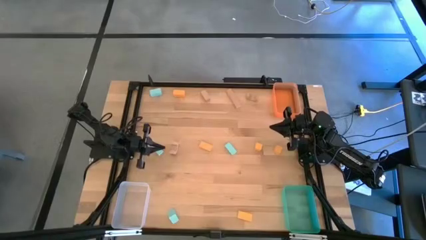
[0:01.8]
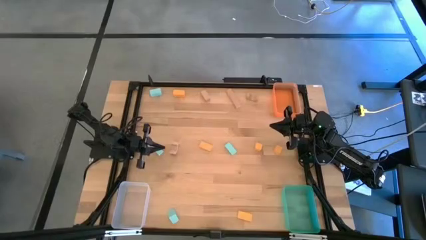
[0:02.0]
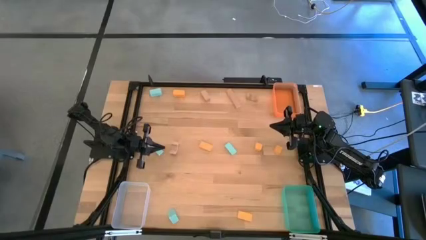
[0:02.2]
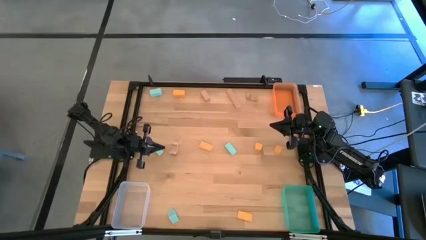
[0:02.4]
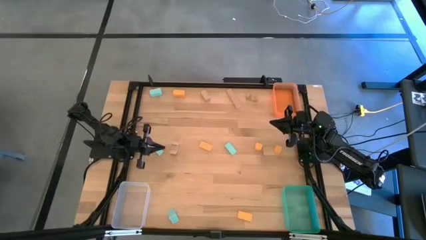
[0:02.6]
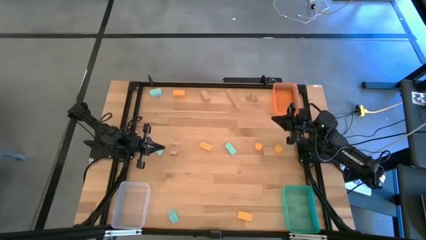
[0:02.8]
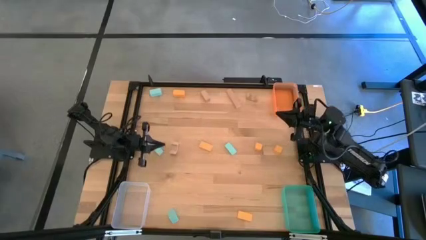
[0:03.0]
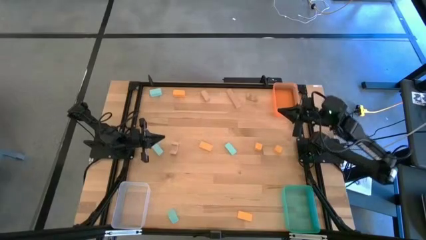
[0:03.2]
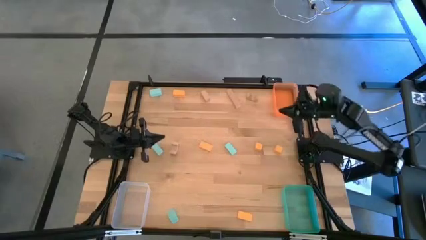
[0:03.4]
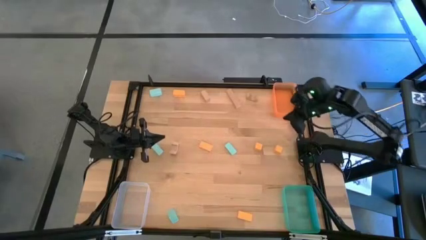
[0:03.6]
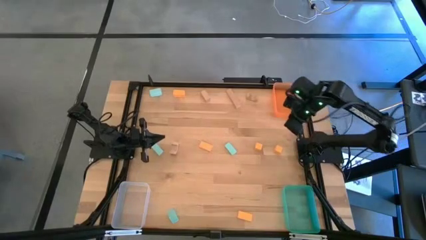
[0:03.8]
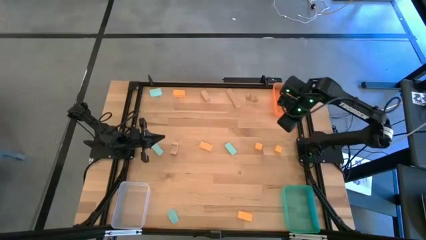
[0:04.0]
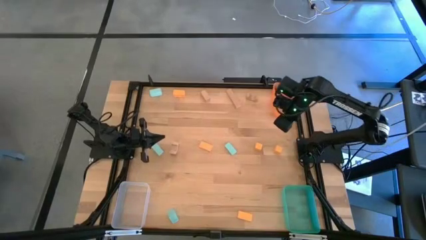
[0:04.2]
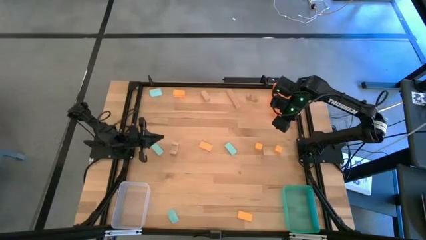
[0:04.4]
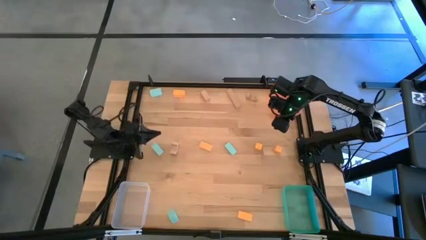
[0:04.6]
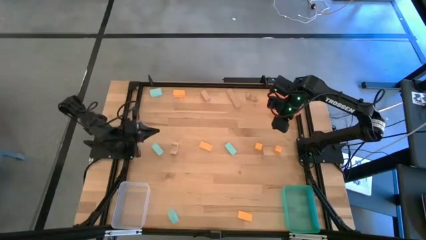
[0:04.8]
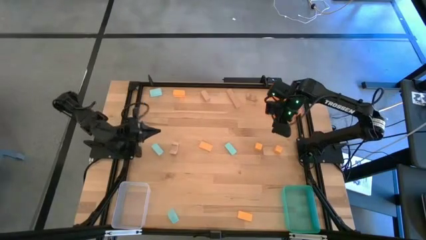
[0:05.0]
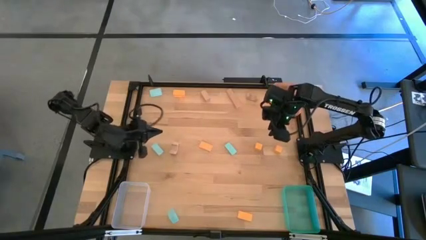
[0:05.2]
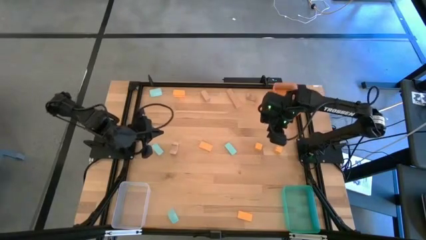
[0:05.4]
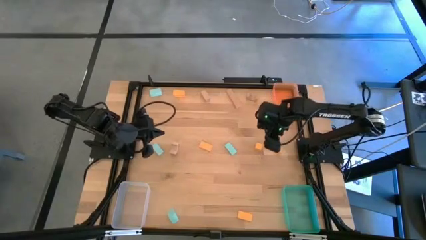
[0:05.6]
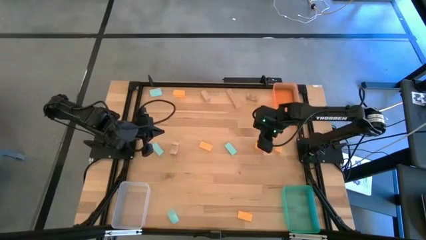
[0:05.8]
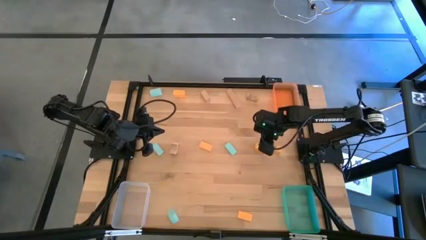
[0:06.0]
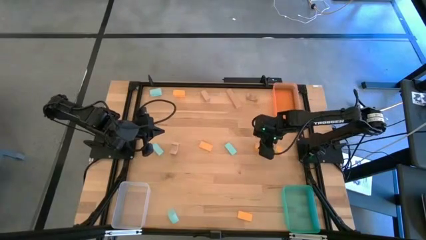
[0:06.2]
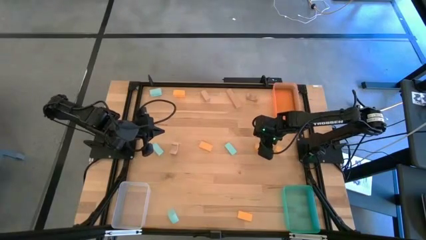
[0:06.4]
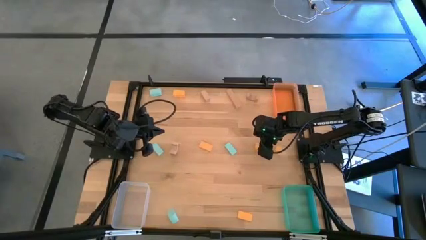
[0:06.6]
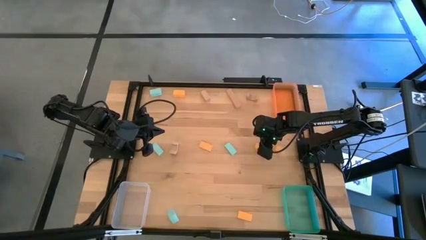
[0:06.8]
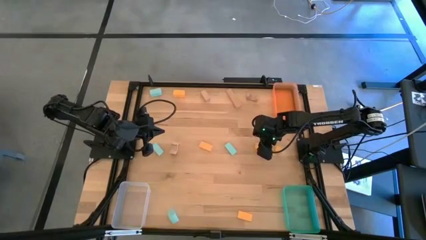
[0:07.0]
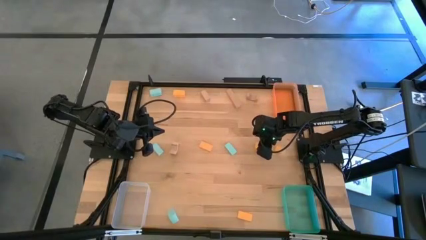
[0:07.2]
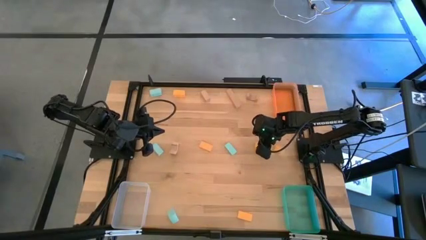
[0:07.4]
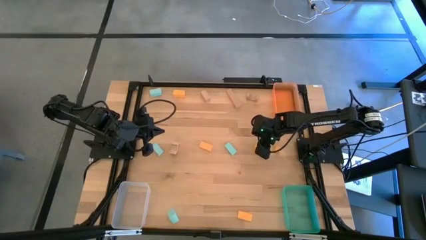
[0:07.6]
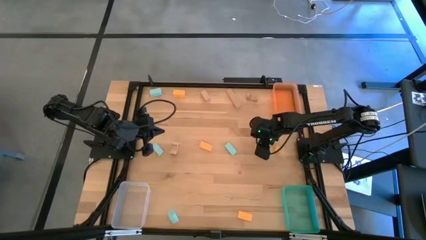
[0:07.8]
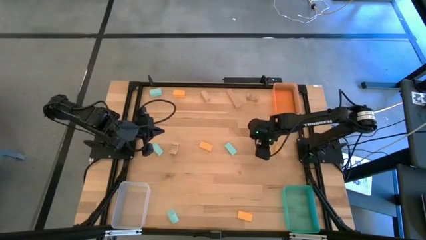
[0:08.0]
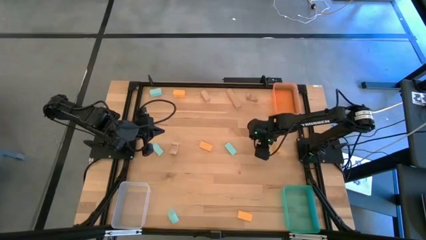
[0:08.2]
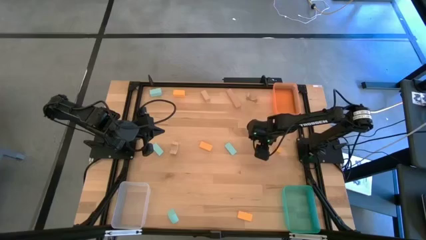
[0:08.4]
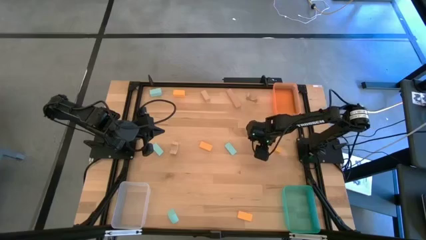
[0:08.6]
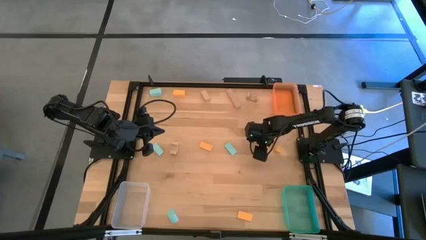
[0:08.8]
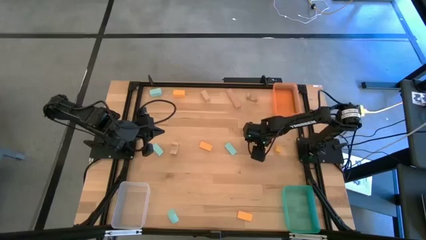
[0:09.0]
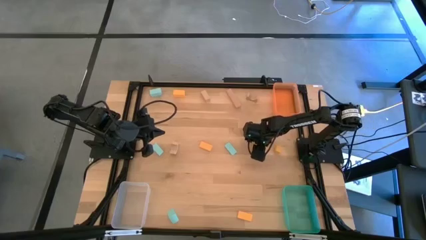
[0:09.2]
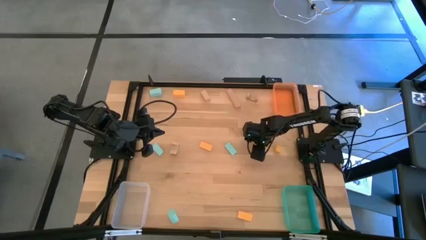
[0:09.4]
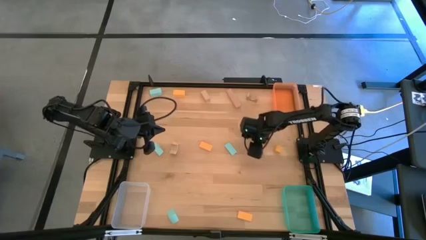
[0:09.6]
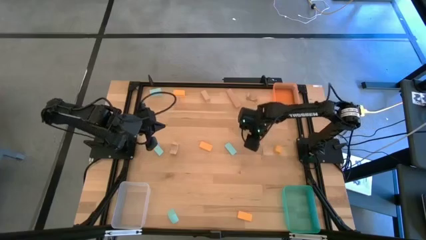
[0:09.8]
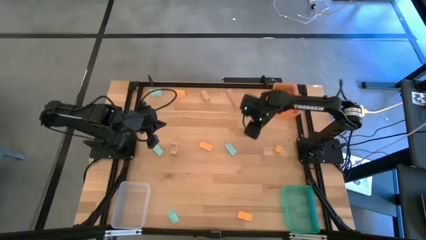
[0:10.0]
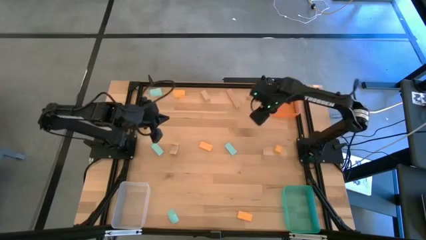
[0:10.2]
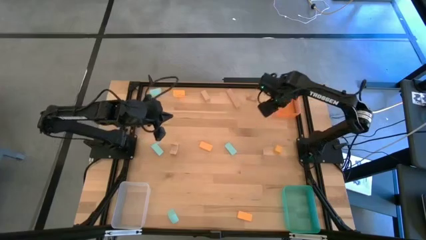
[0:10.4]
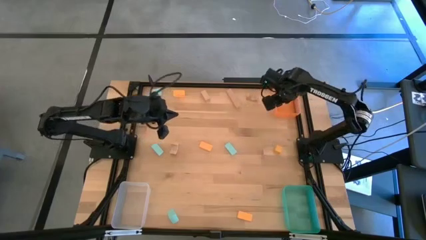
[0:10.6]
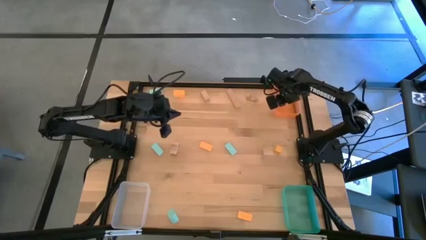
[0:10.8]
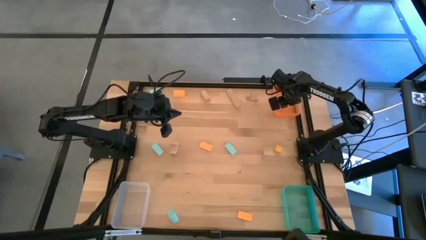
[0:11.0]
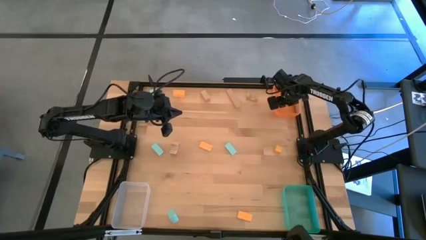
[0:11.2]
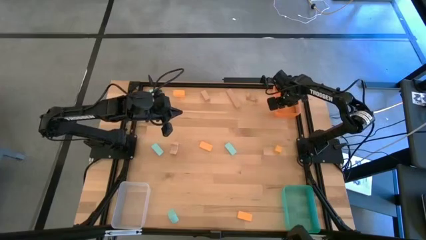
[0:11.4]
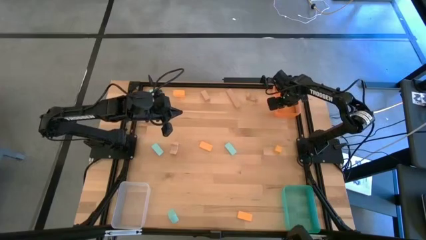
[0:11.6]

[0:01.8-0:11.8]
Task: Sort & place blocks by color
Put the orange block into the orange bin

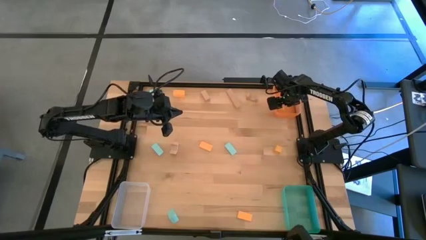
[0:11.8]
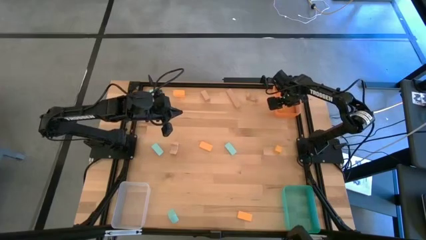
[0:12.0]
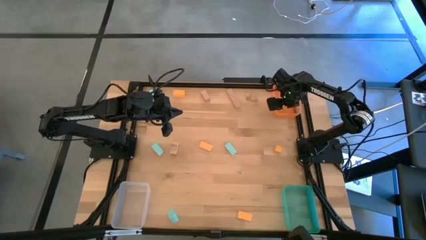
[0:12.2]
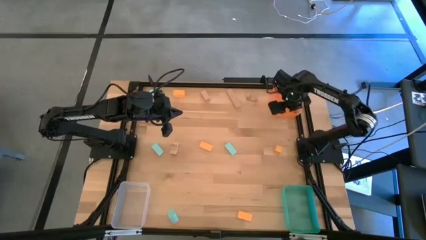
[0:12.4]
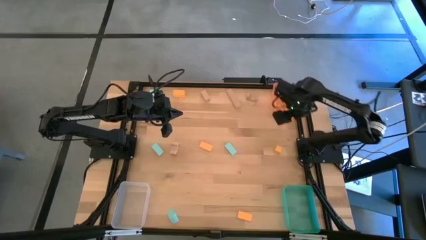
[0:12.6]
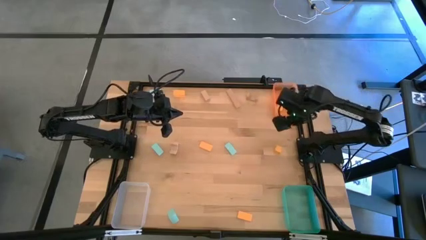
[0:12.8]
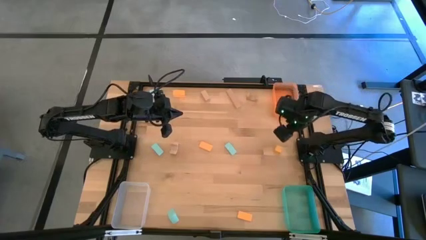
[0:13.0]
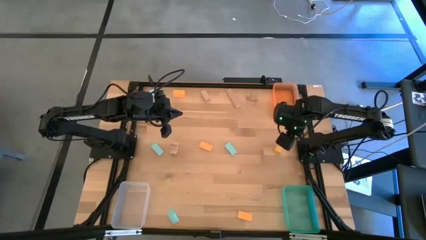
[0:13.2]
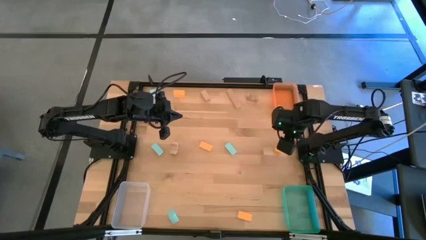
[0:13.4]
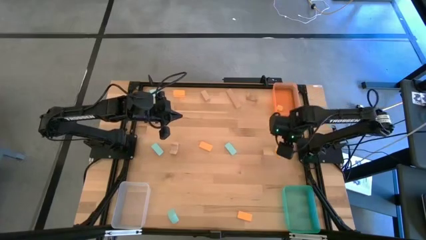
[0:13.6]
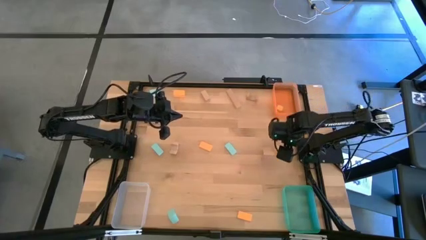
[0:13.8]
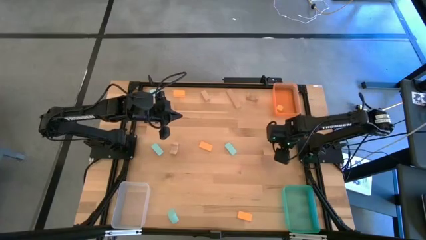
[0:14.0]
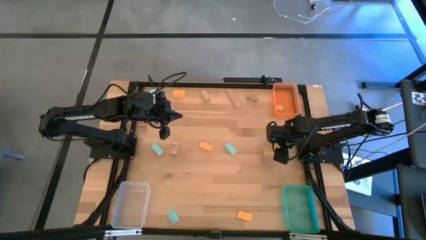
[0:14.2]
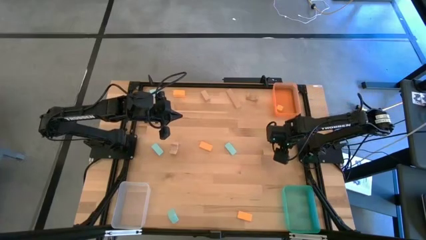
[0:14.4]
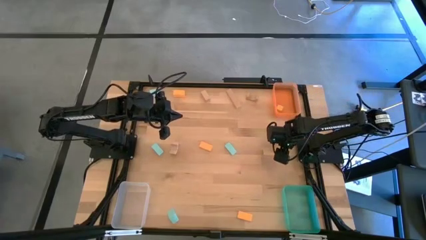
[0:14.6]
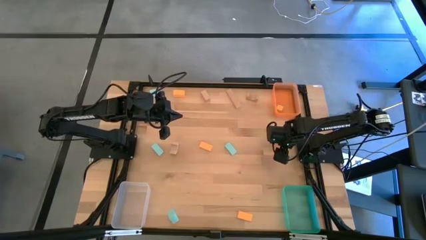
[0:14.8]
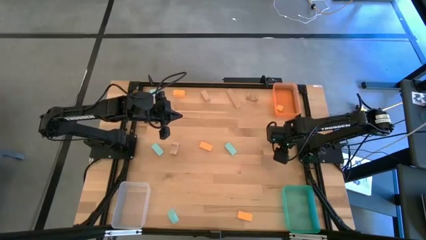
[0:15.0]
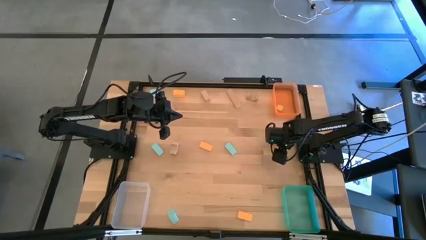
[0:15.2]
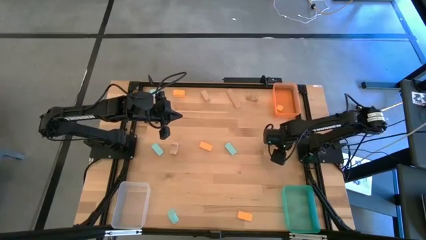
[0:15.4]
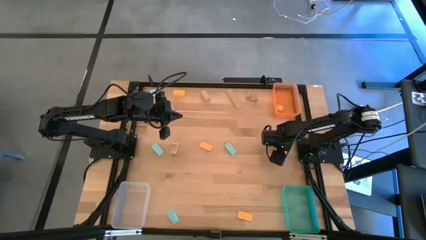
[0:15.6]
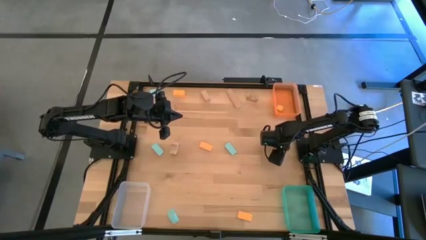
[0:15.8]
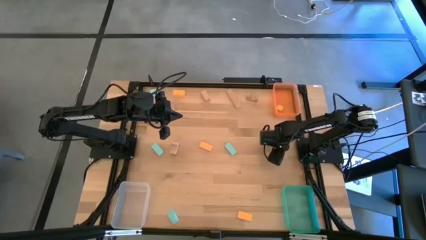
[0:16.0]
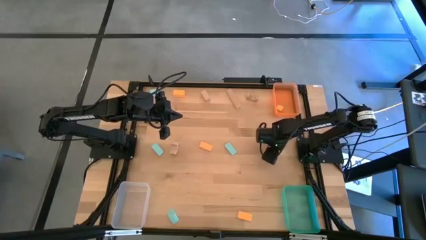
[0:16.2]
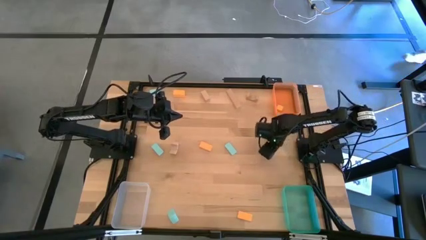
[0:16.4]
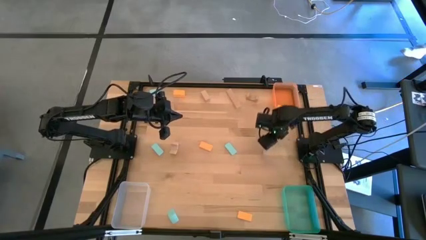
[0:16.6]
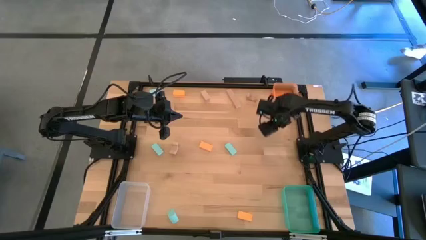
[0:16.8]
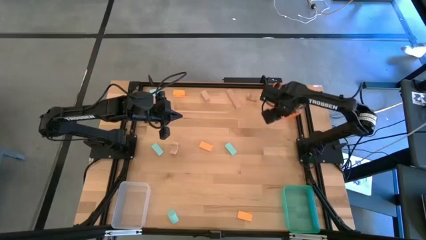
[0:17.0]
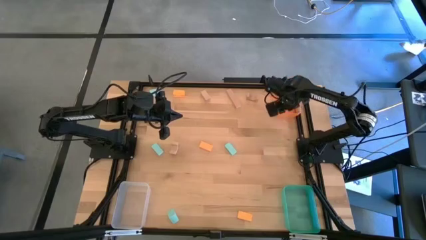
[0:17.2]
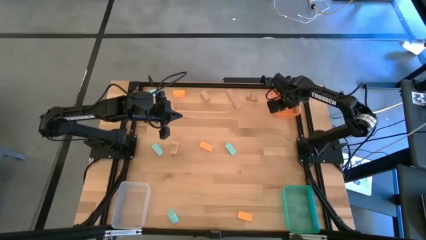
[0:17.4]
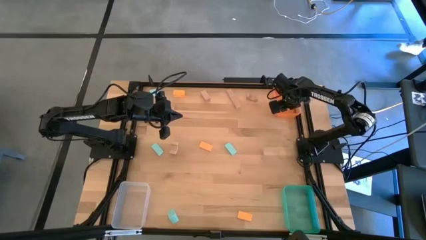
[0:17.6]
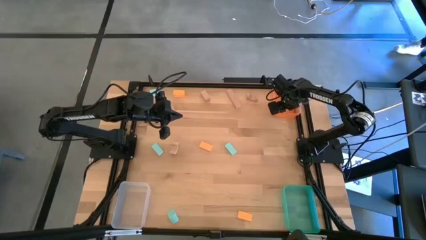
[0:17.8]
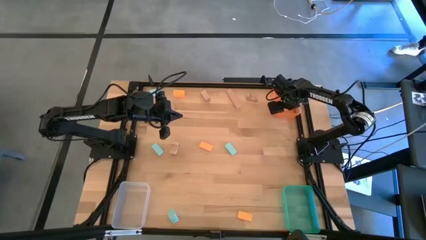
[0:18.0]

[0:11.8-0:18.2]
Put the orange block into the orange bin
